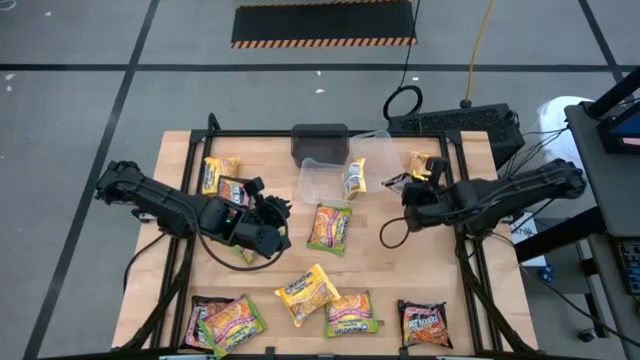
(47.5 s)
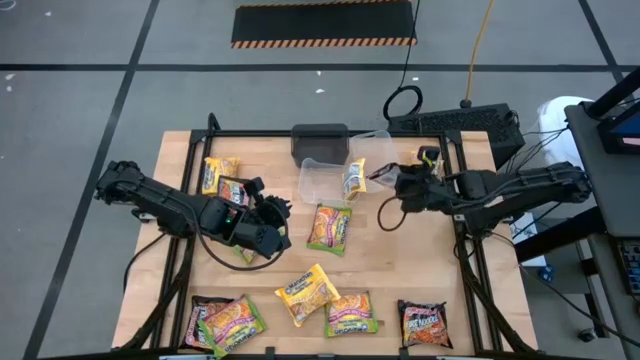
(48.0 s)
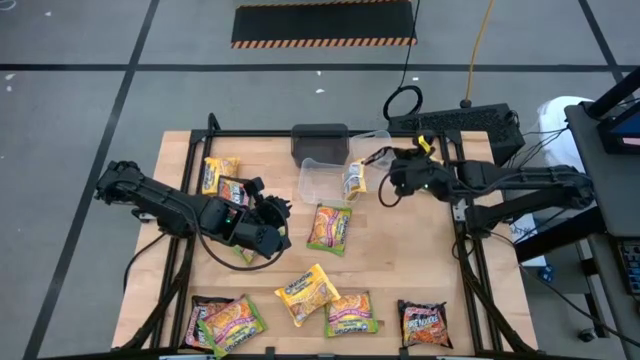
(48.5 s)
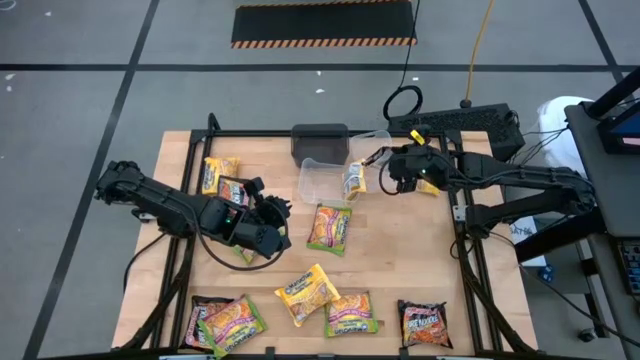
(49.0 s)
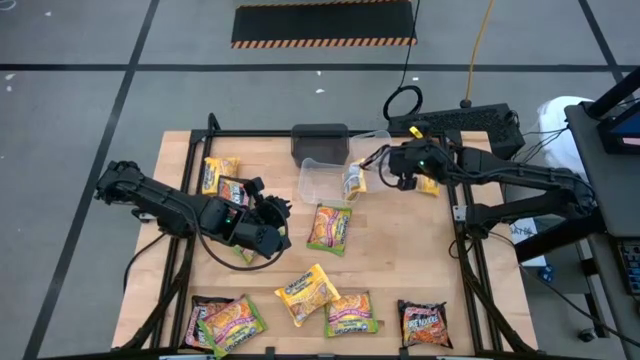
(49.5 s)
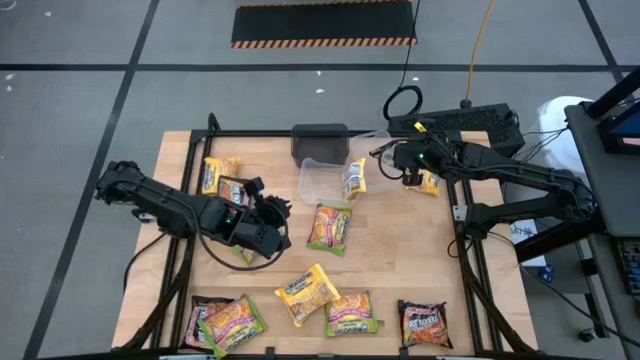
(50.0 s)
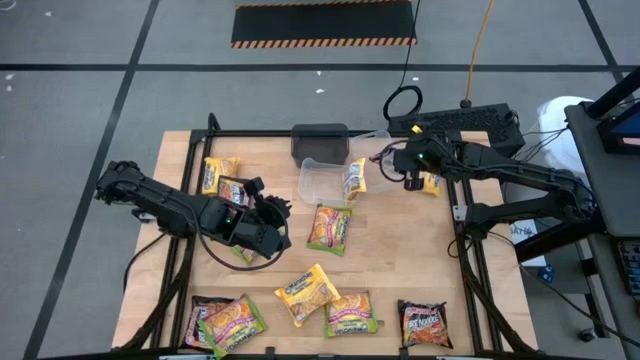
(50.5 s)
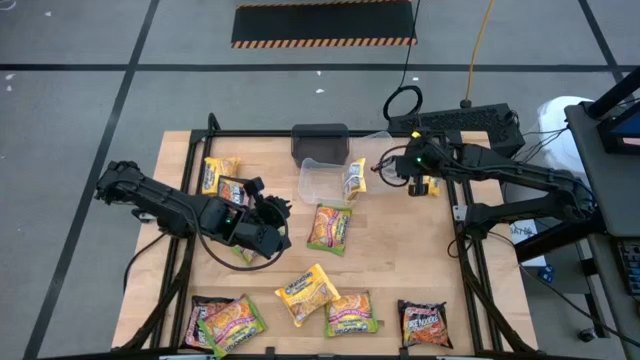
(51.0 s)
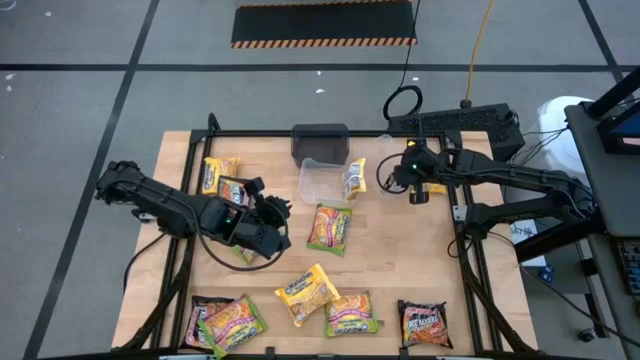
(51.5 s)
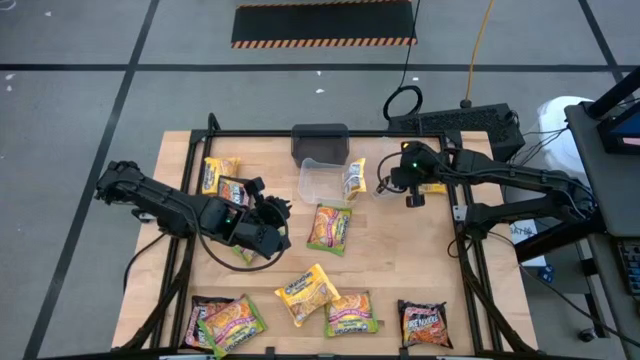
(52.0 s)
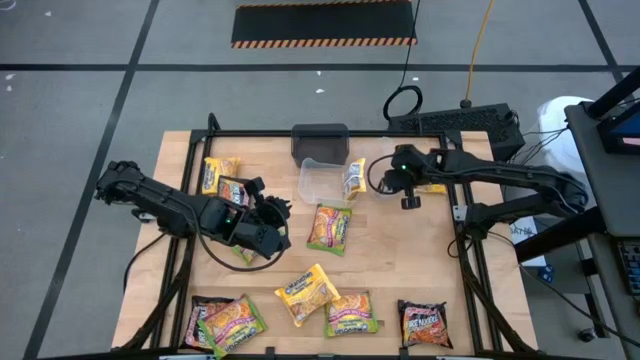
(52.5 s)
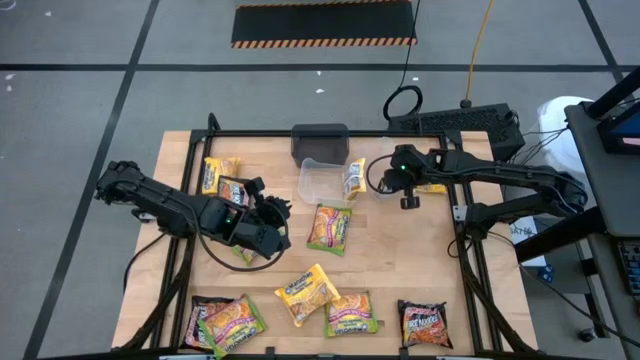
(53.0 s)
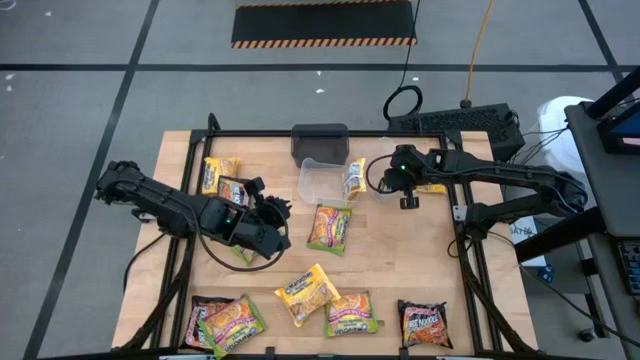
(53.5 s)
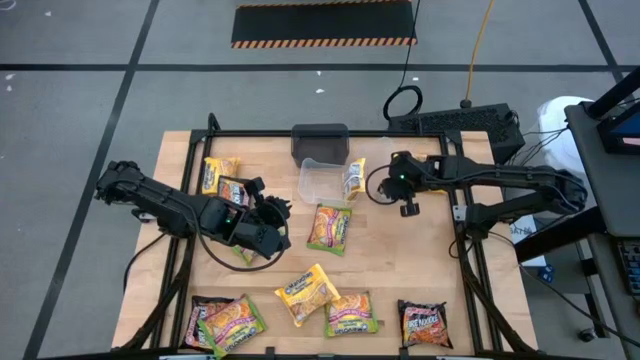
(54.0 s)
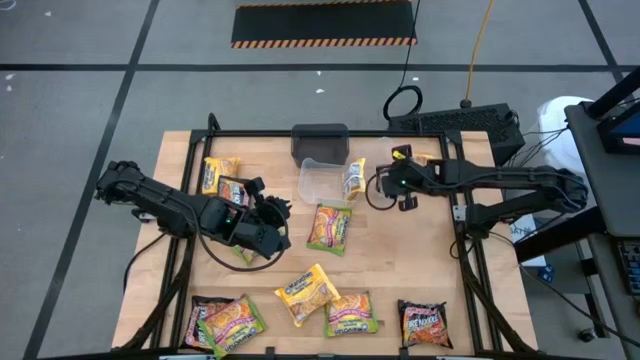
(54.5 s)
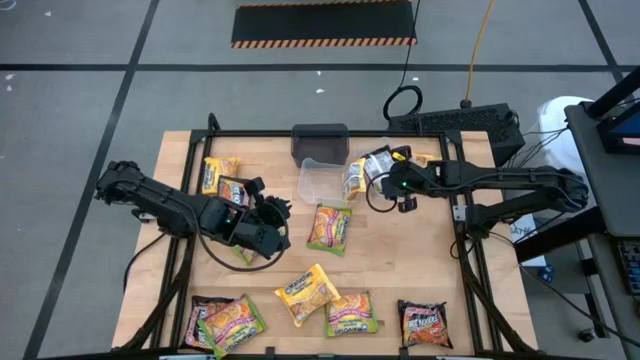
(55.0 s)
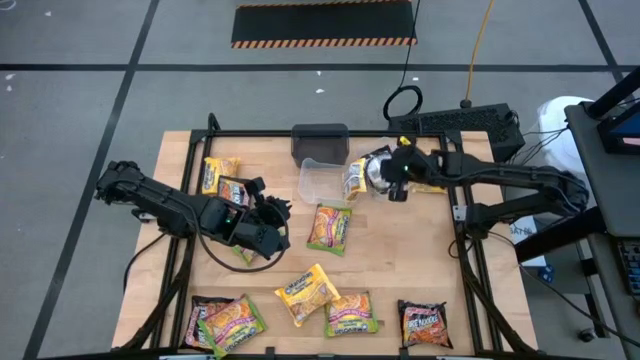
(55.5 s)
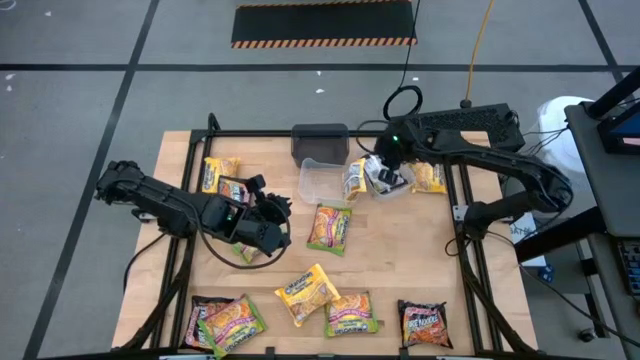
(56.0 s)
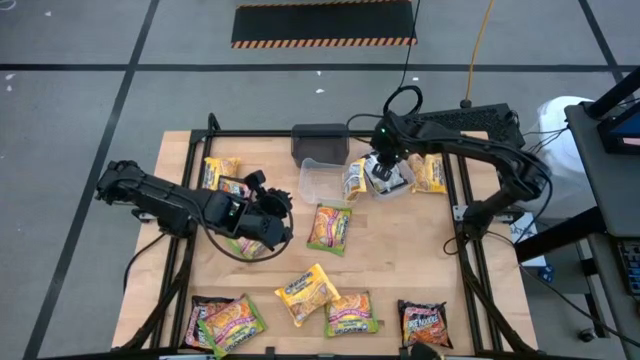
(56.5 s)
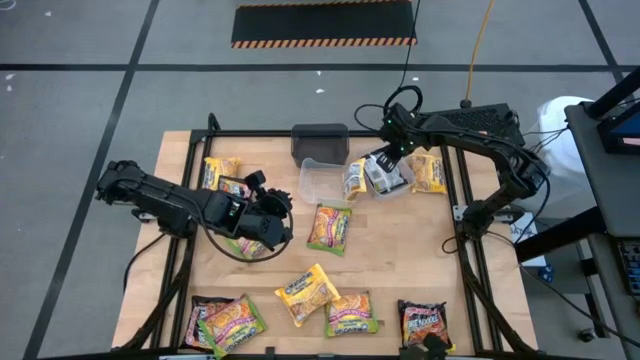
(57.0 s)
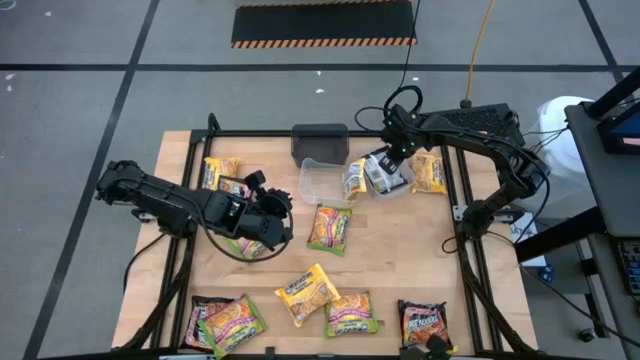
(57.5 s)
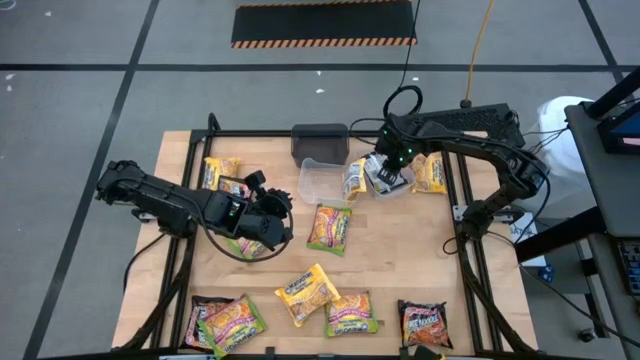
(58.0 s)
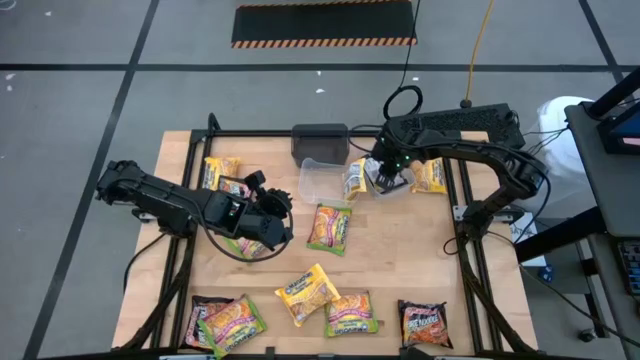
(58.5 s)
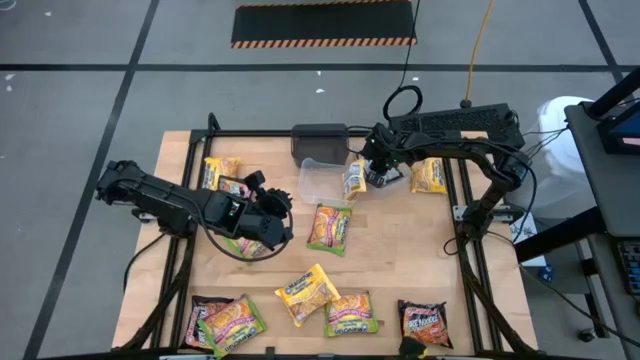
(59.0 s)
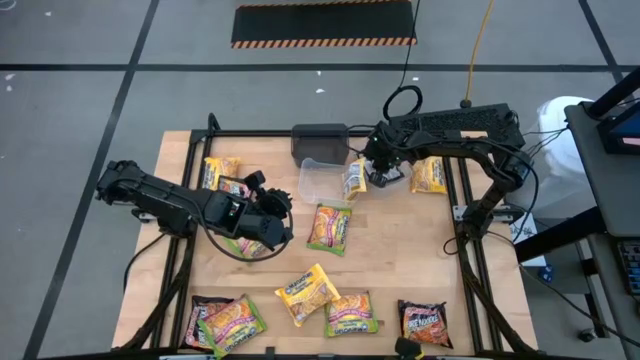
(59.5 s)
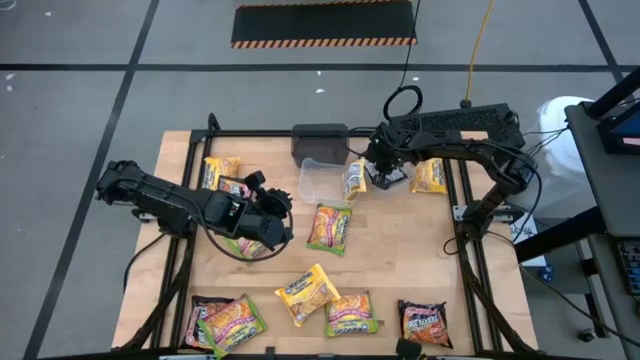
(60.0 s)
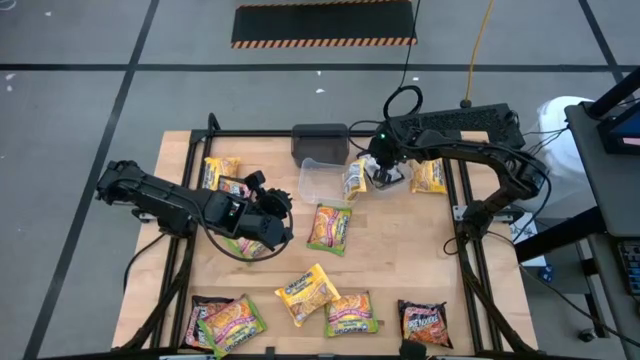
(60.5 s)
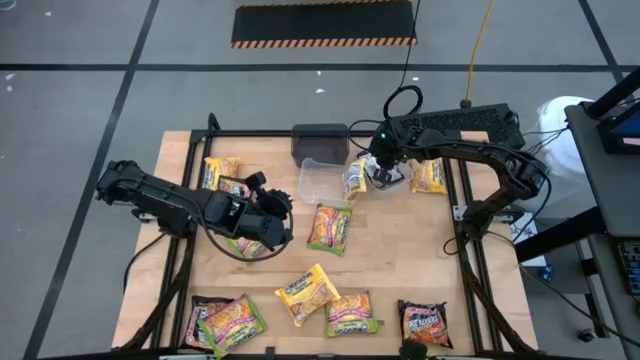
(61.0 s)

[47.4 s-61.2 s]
Task: Sort Maruchan noodles
Put the black noodle pack into the right transparent bin

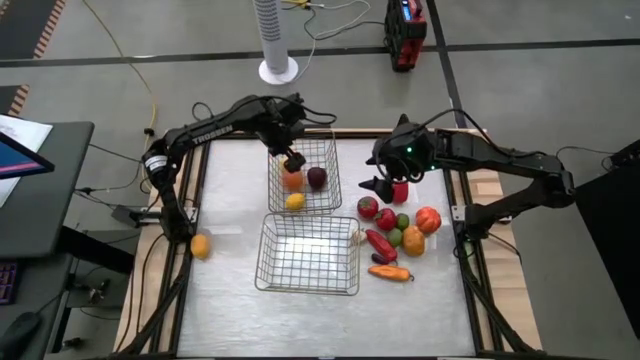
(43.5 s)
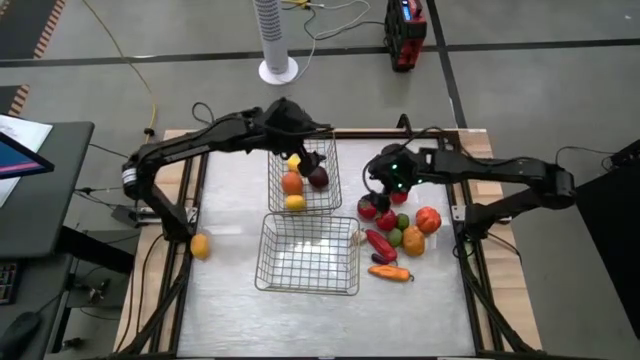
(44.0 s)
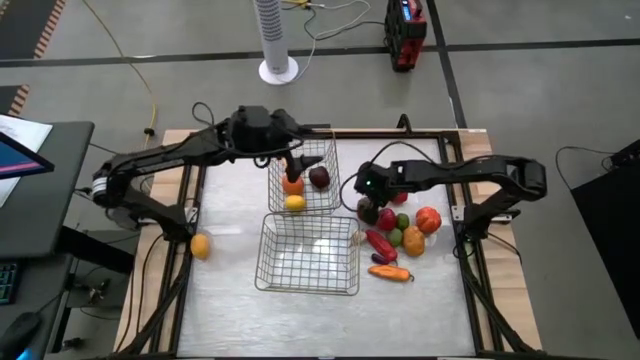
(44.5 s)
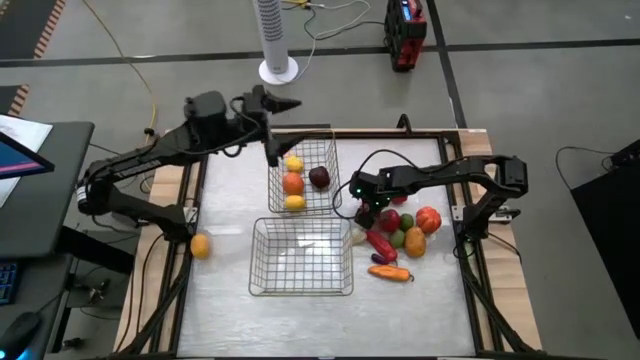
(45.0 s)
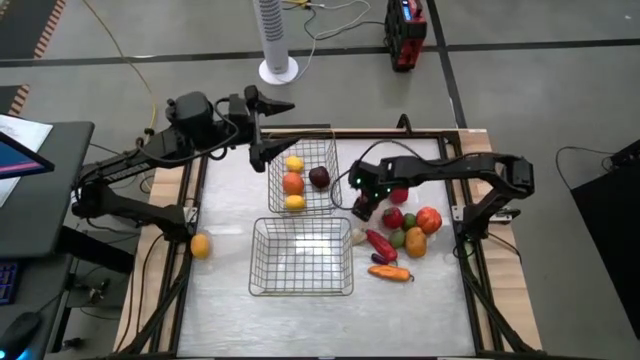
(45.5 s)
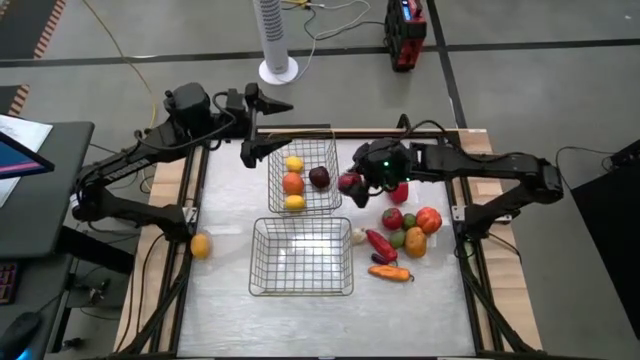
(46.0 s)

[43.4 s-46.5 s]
Task: Sort produce into baskets
Put the left red tomato into the top wire basket

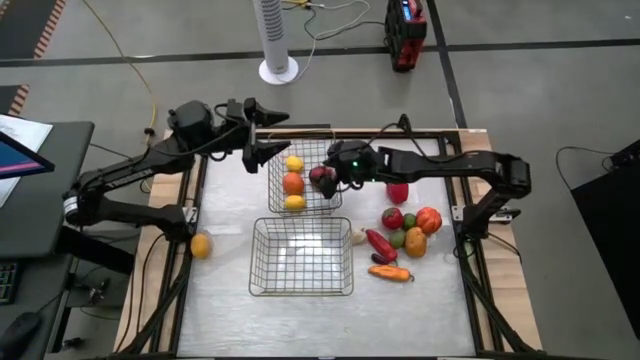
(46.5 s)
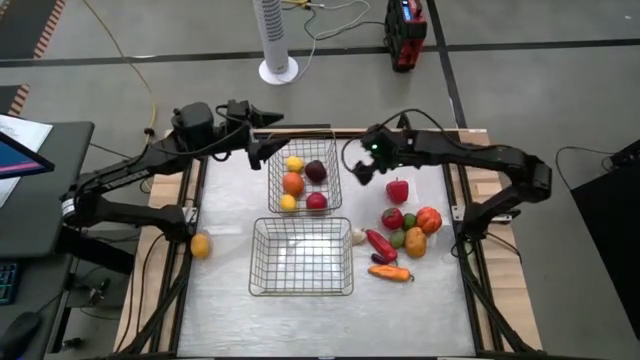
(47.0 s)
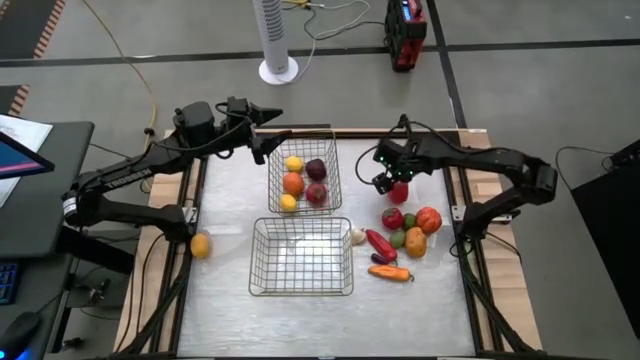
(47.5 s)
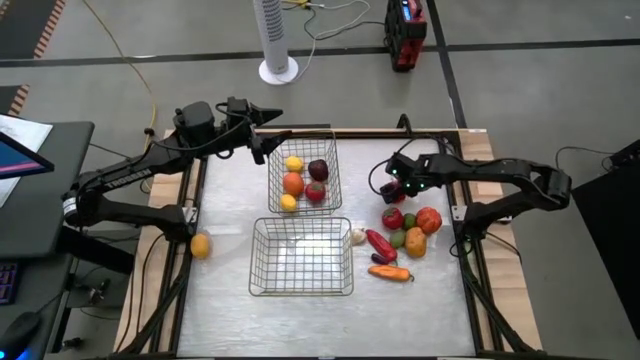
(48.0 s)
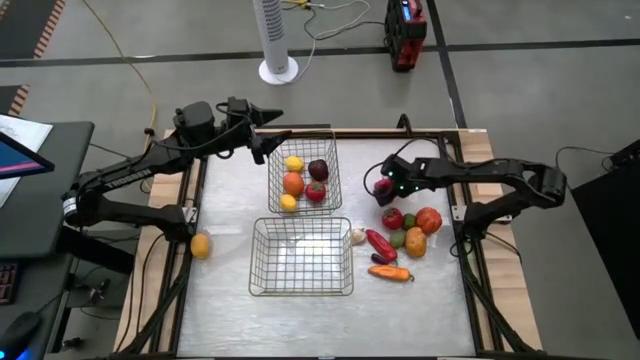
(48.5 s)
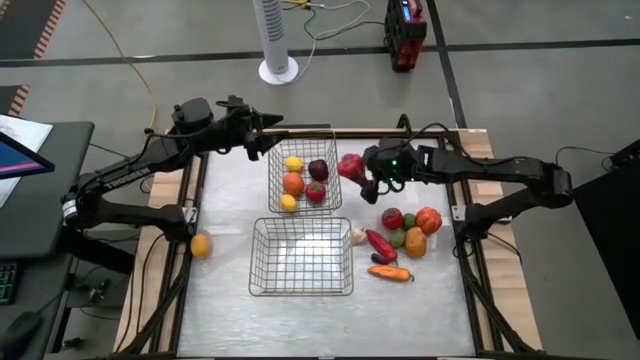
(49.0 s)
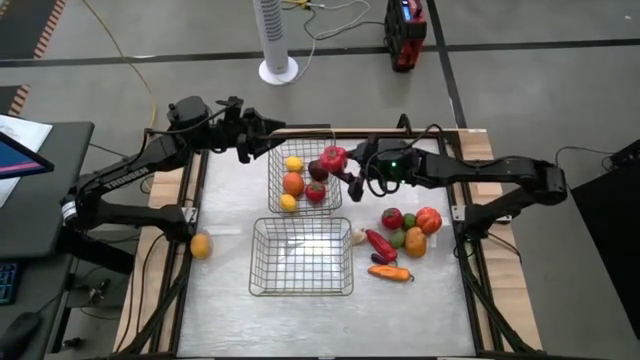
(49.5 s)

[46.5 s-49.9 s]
Put the red bell pepper into the bottom wire basket
